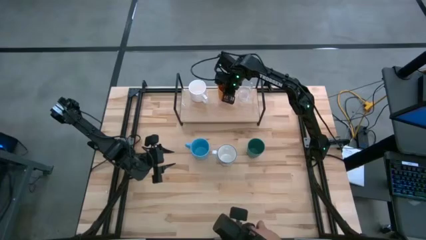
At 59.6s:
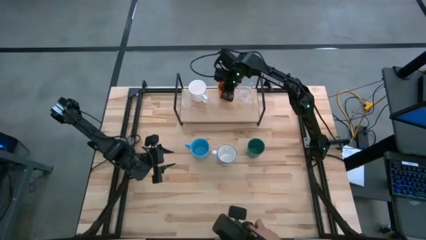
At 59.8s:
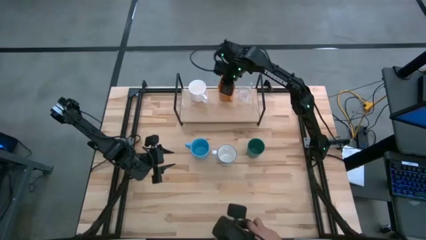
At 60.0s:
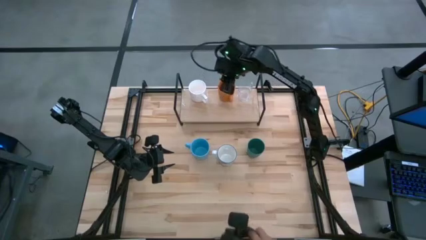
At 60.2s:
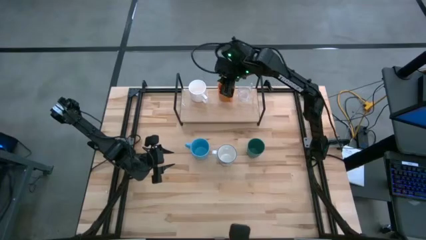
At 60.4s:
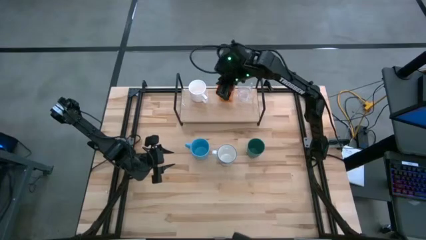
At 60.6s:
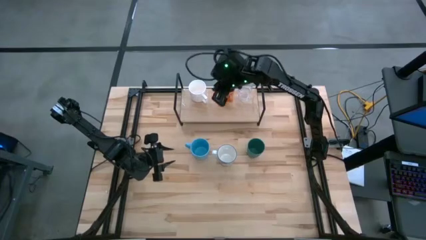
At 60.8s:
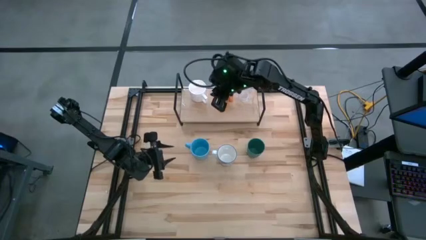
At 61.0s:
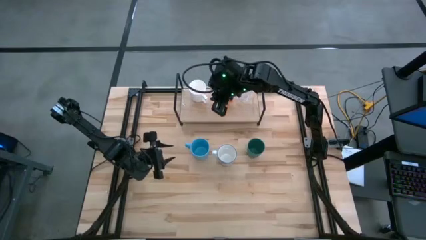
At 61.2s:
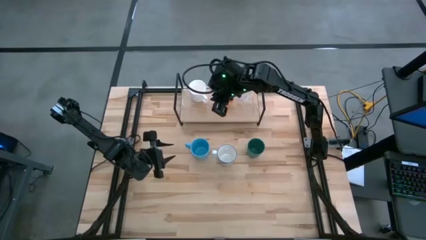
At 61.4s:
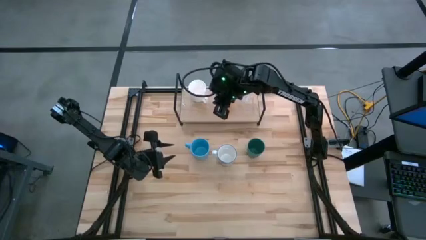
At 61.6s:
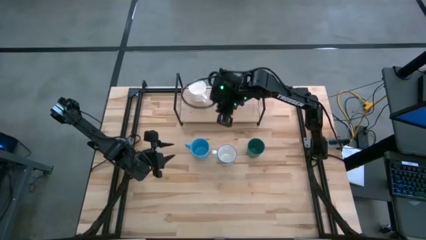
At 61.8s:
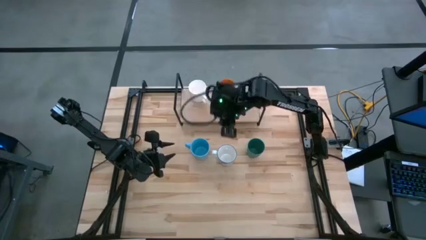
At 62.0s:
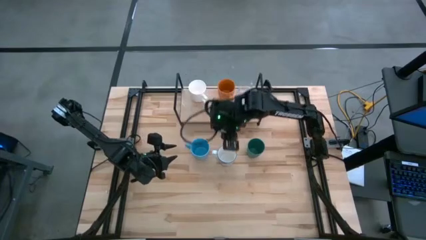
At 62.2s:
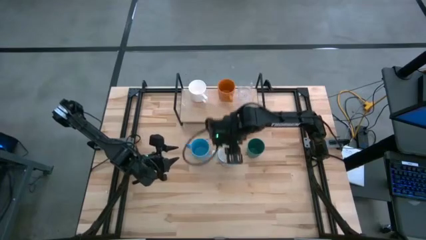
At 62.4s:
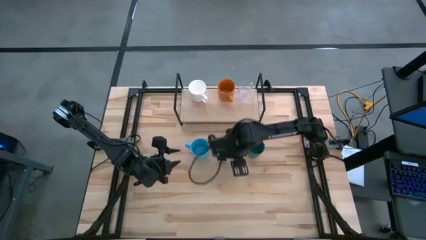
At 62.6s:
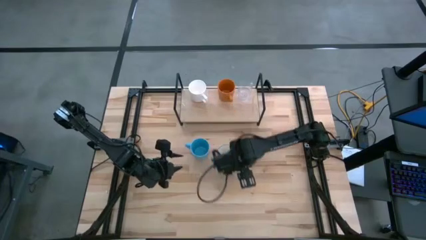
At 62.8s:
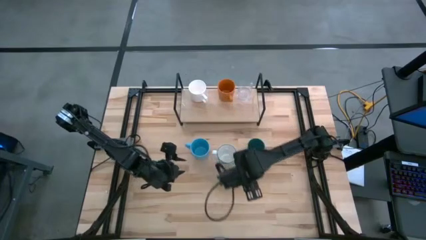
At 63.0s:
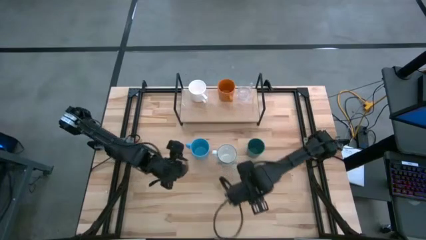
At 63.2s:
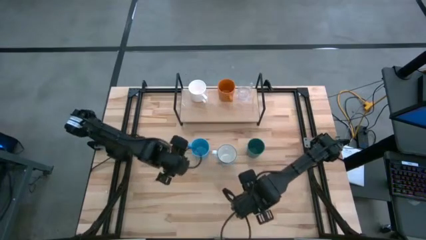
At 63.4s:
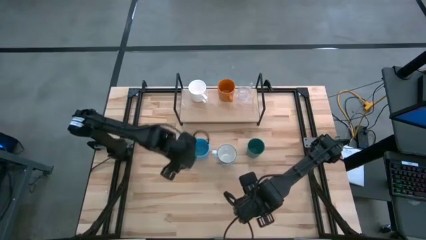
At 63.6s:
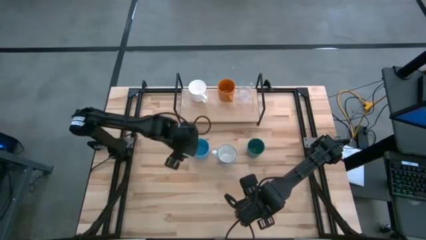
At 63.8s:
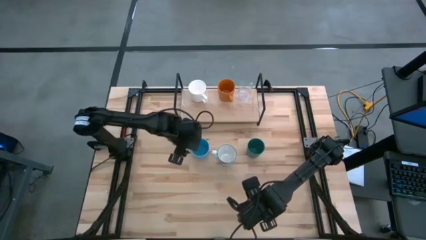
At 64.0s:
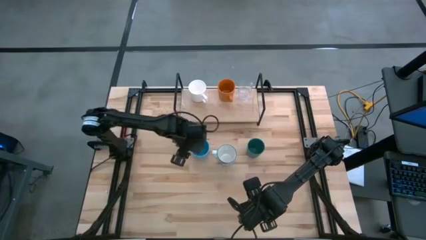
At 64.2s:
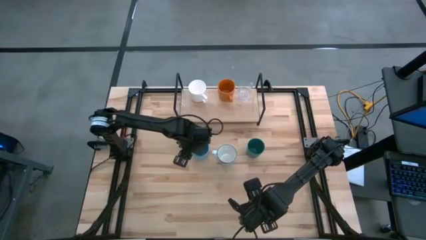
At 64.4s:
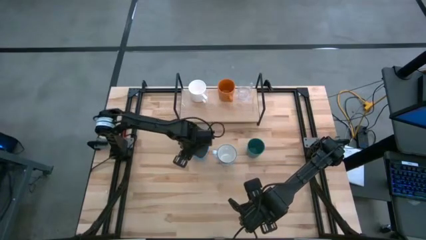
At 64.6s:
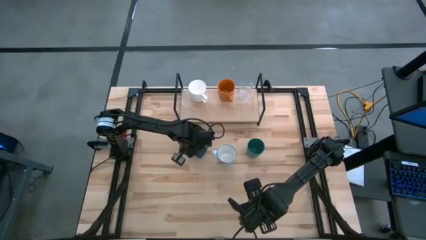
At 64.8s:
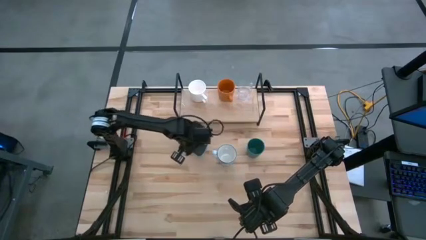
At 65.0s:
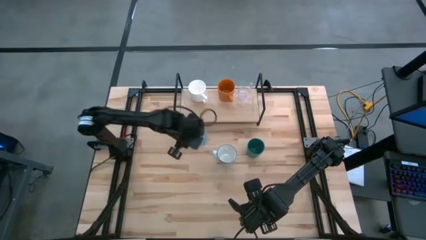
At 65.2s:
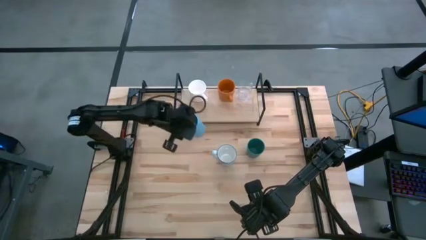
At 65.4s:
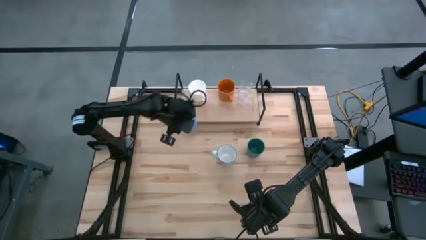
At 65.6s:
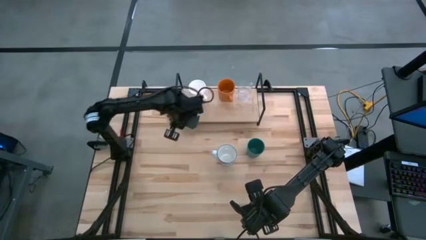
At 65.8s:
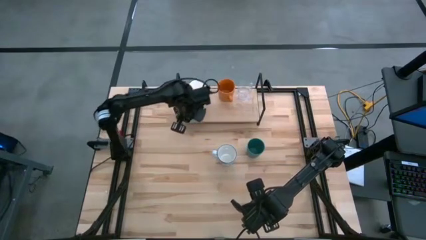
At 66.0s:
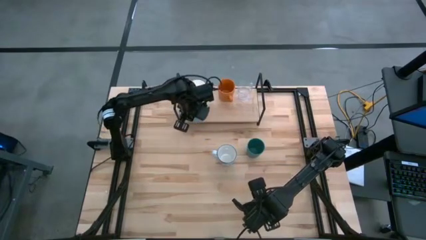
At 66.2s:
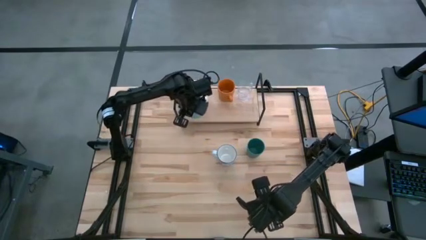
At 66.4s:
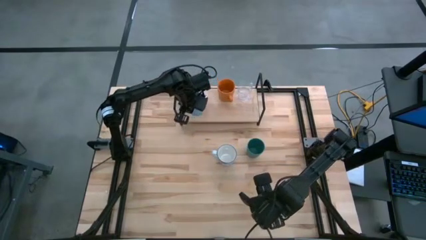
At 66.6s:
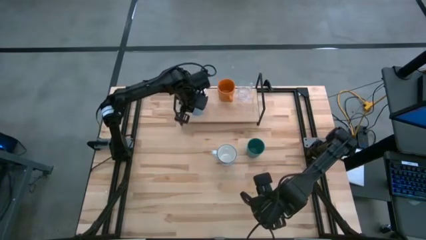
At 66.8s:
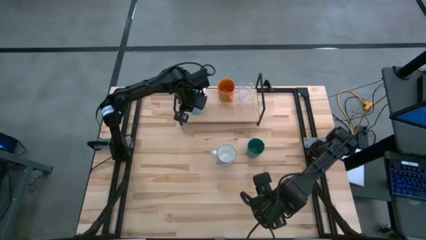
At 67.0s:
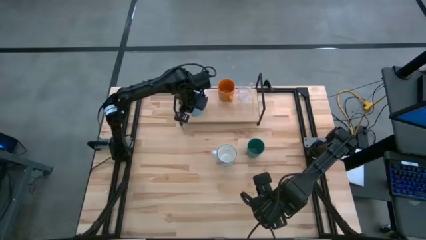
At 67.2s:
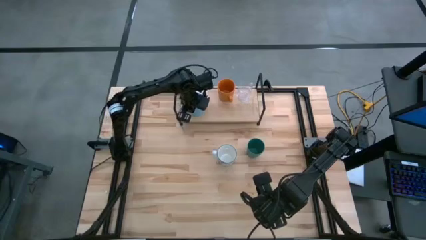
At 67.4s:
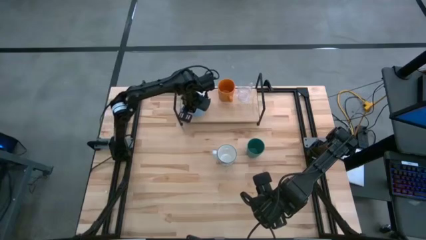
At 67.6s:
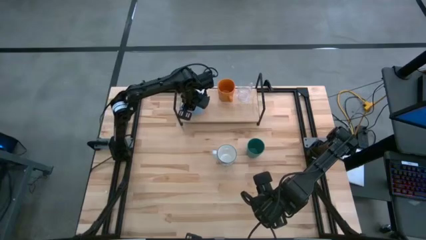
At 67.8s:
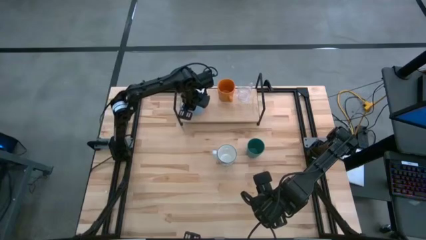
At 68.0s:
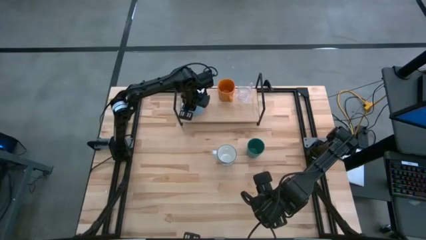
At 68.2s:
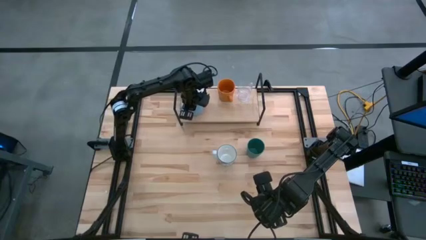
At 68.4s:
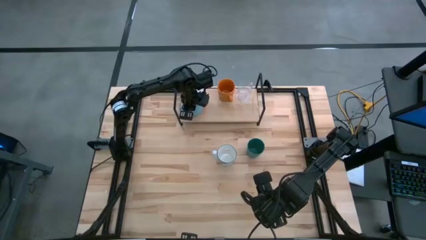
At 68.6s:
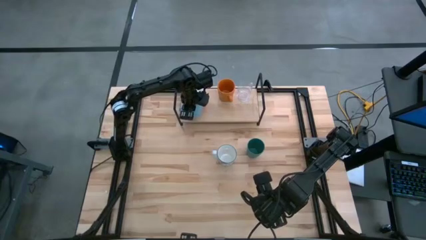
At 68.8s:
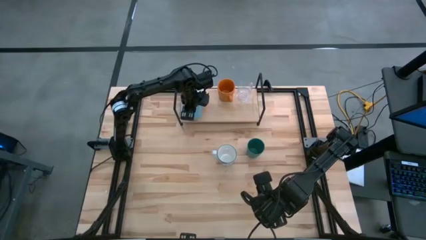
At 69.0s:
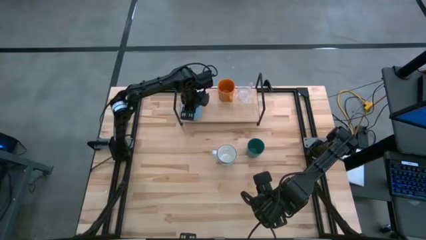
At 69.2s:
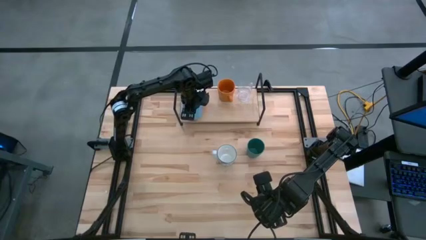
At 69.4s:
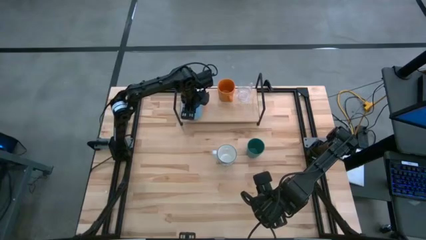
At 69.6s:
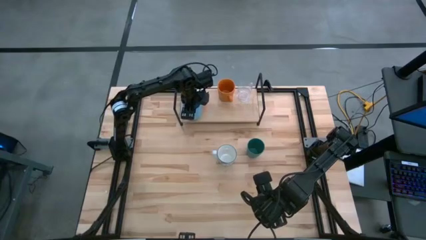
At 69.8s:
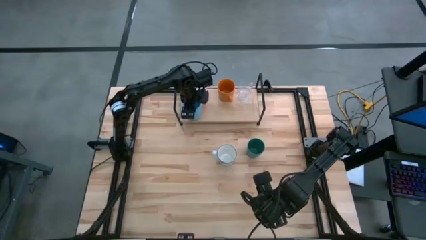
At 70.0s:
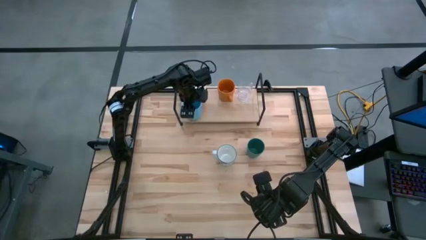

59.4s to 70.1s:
Task: Stack small to large cups/mugs on shelf
Put the blue mug on the shelf
